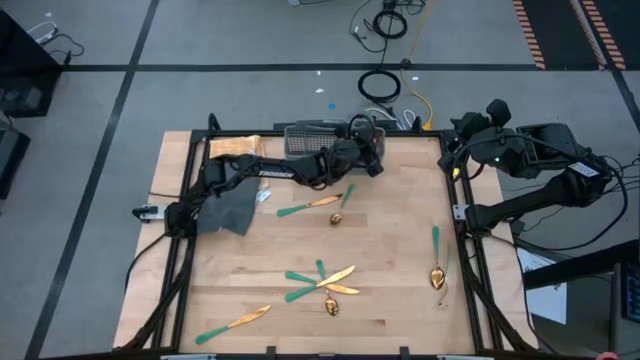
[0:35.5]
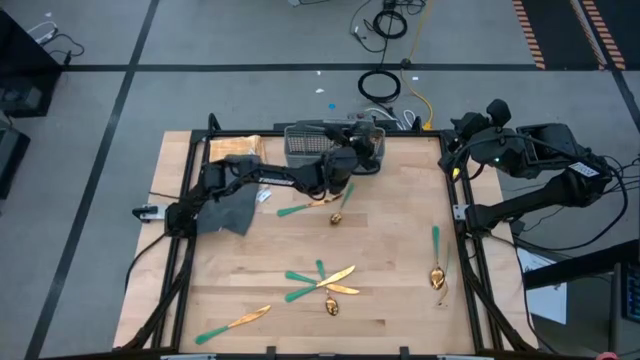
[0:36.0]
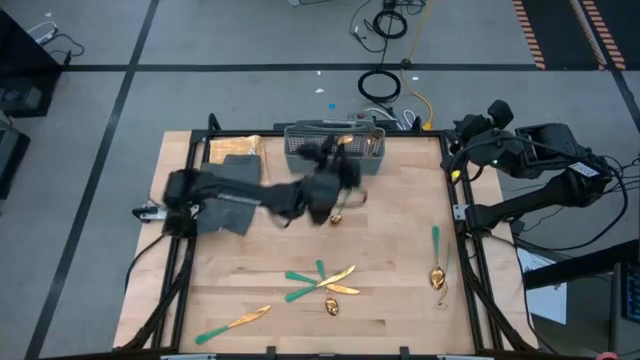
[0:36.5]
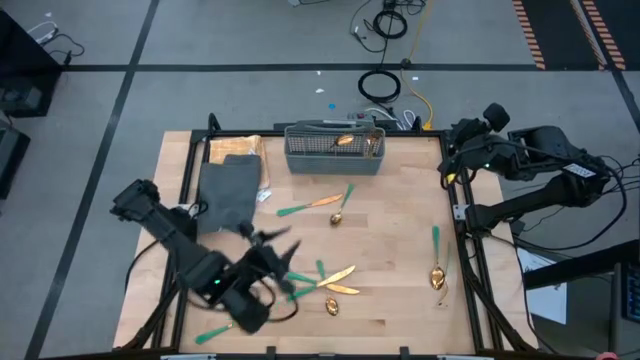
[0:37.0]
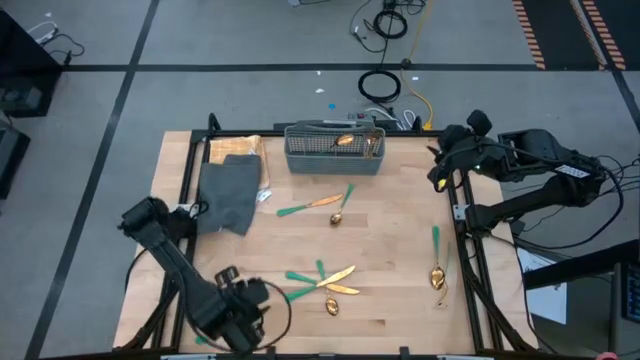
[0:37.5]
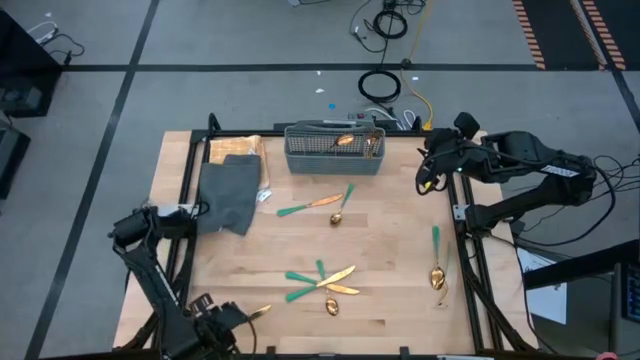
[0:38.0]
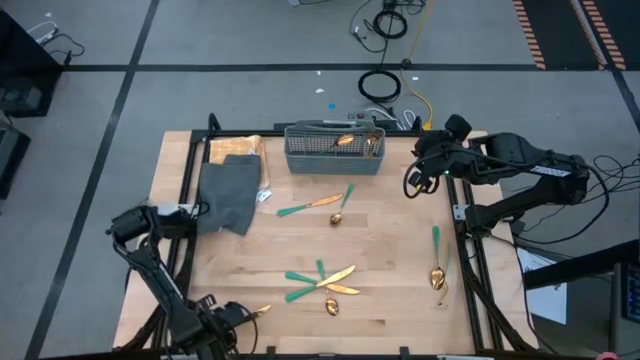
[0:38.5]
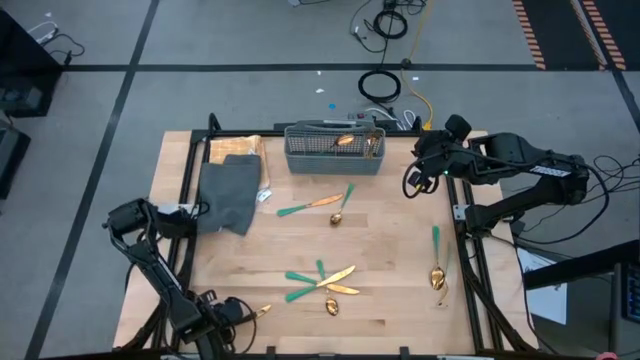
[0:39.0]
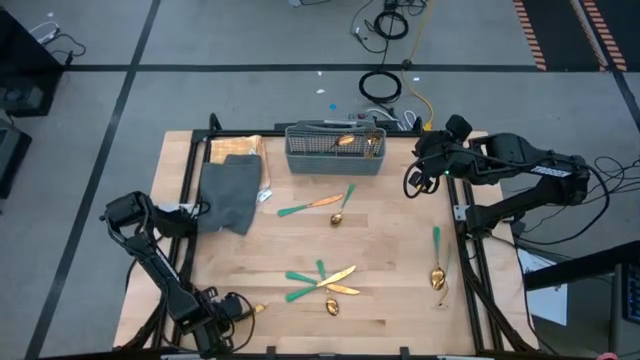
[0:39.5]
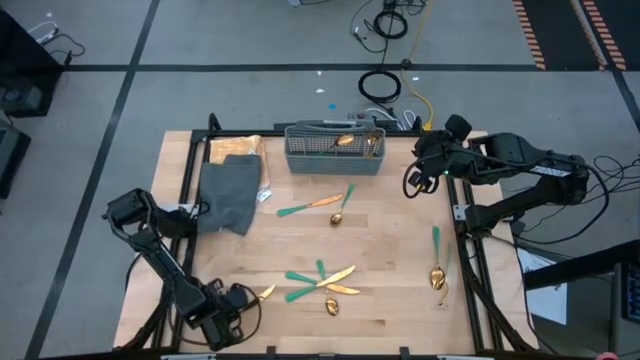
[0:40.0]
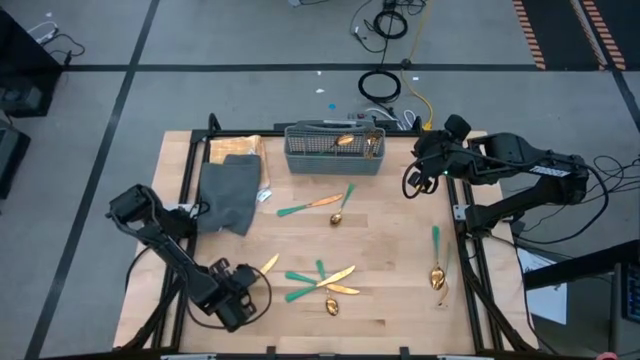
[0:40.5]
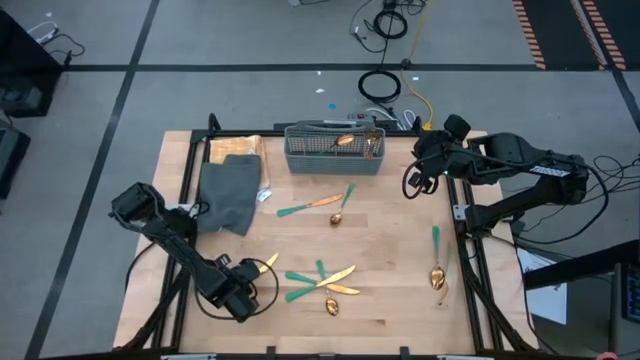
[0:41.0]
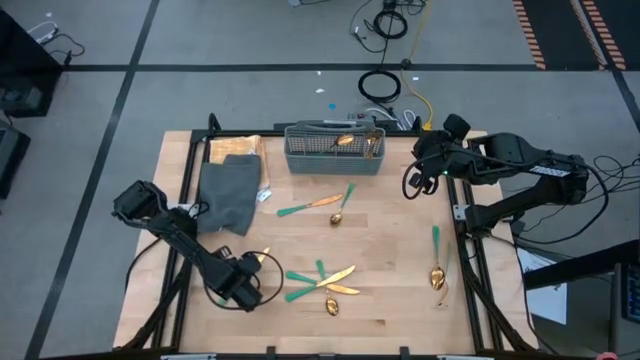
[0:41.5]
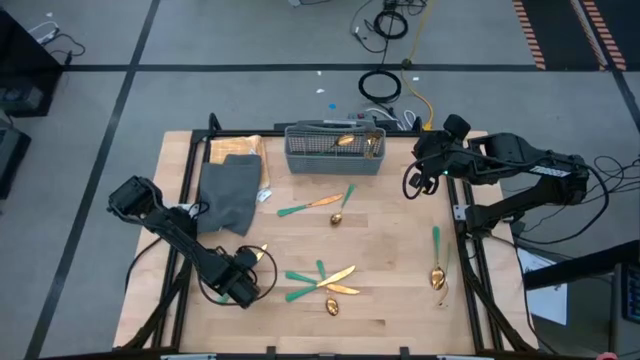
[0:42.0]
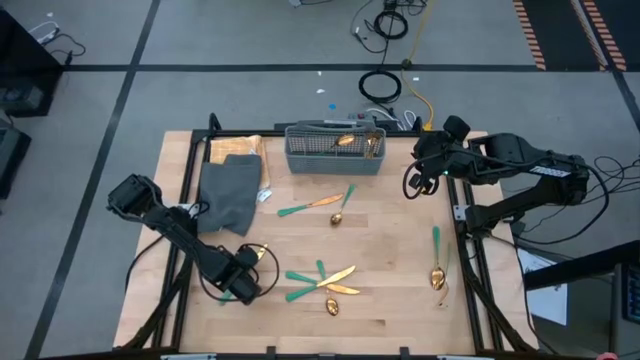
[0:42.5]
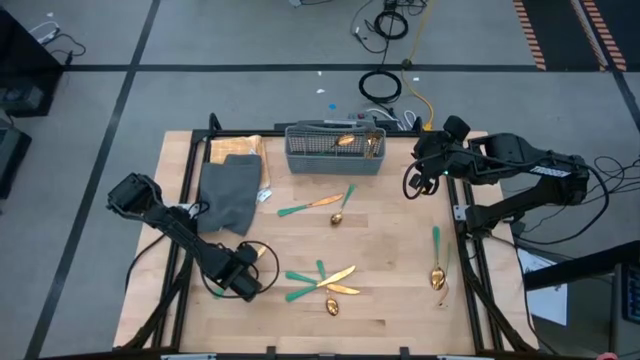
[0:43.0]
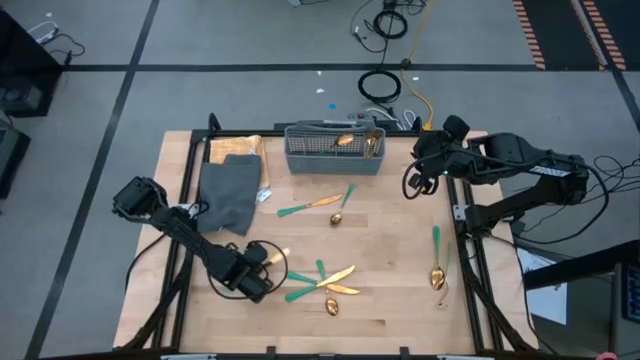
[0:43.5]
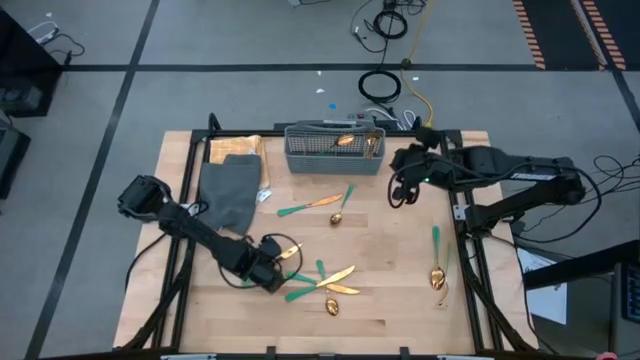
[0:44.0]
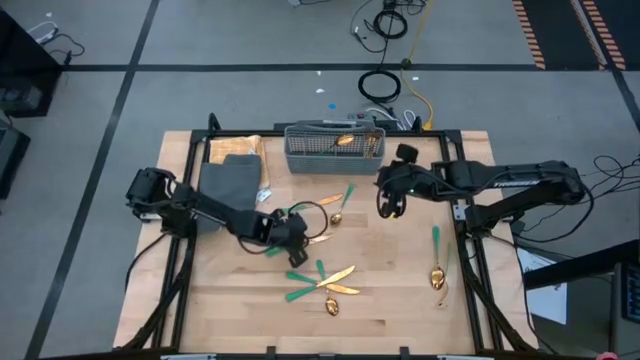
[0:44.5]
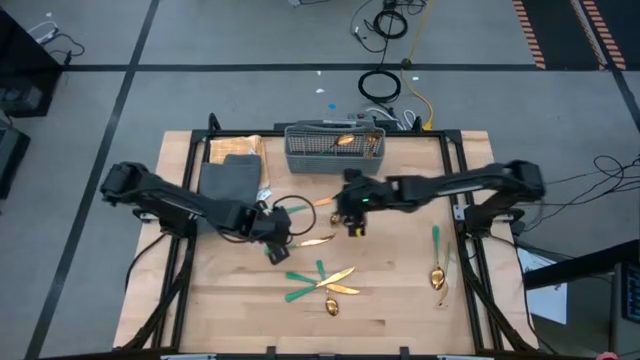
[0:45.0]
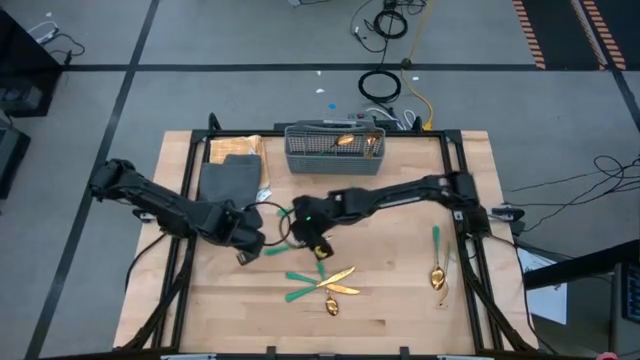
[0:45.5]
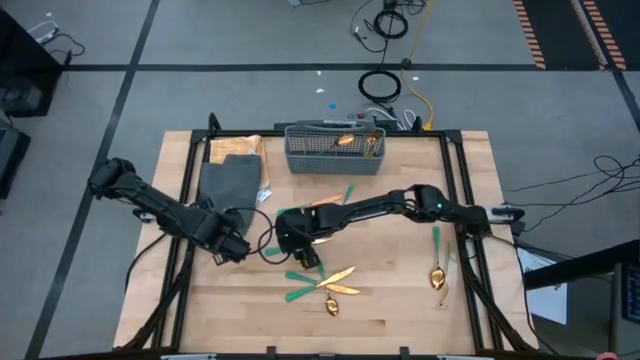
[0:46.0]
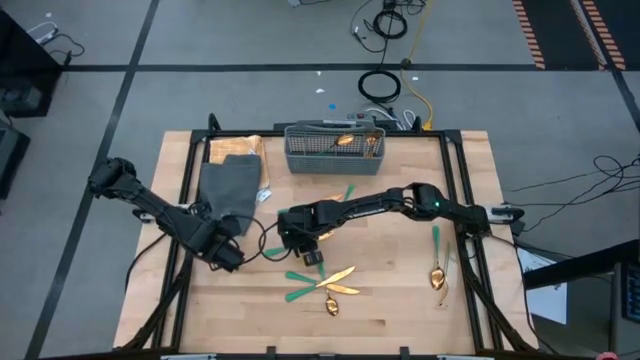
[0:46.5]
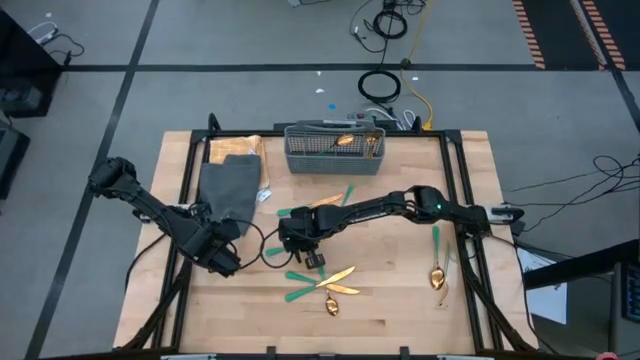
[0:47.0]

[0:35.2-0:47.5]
Task: Sort silverware
Put the green knife into the gray silverware basket

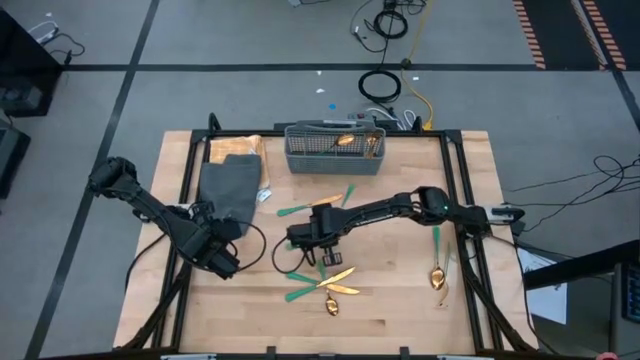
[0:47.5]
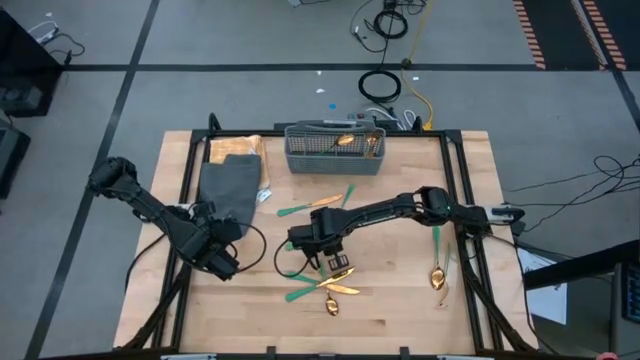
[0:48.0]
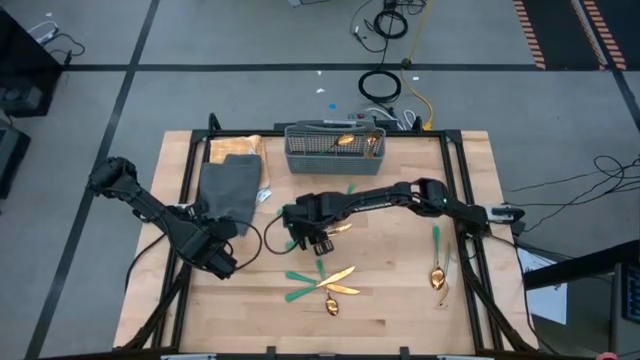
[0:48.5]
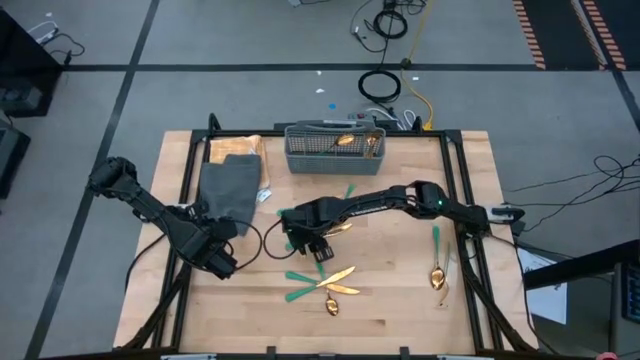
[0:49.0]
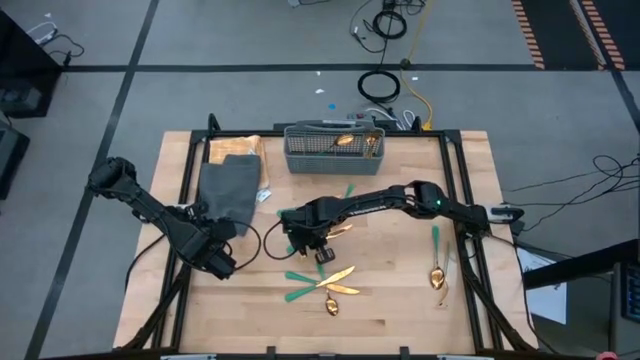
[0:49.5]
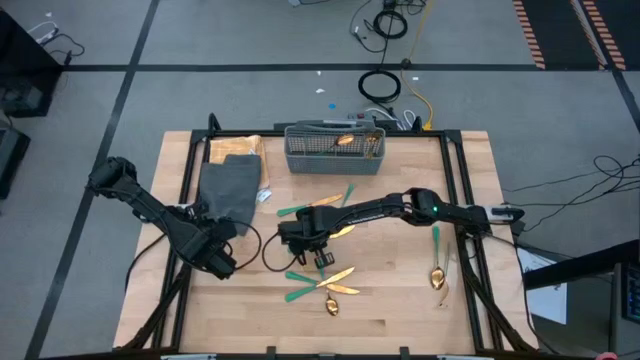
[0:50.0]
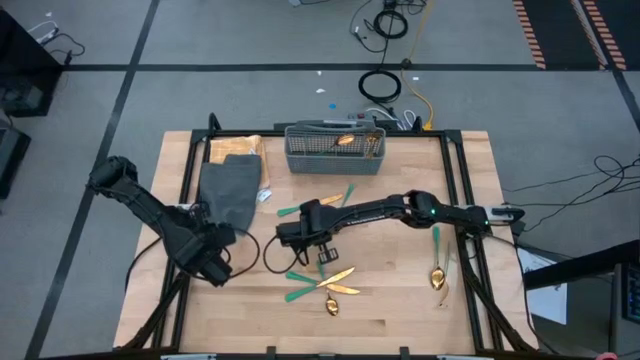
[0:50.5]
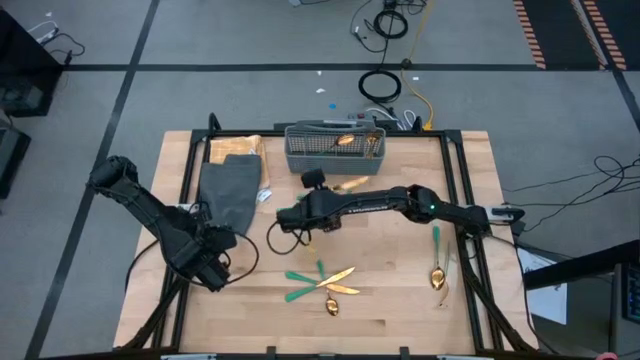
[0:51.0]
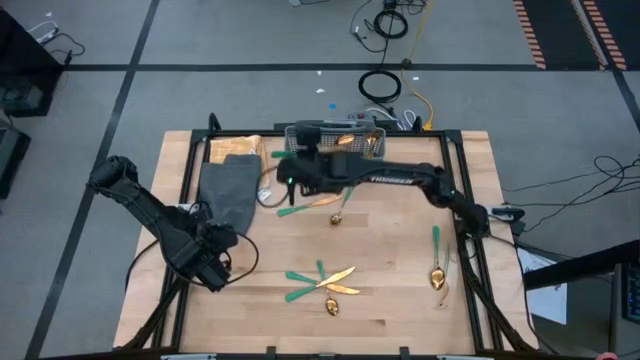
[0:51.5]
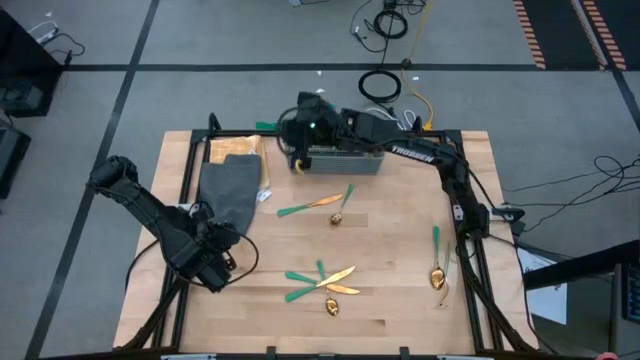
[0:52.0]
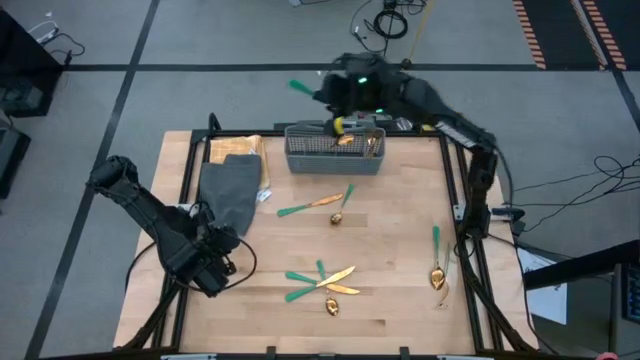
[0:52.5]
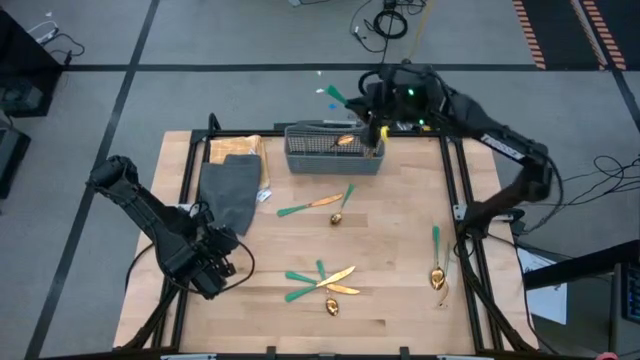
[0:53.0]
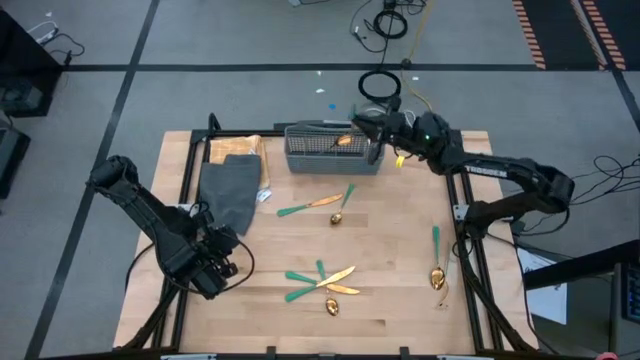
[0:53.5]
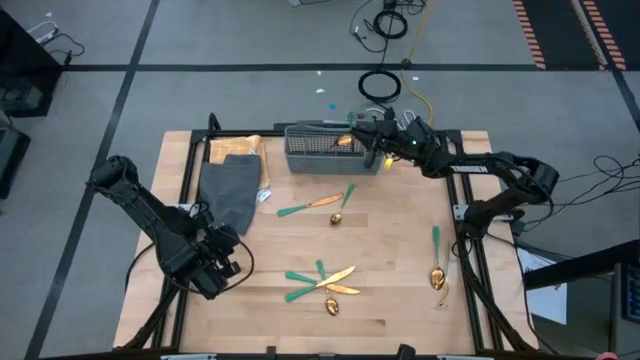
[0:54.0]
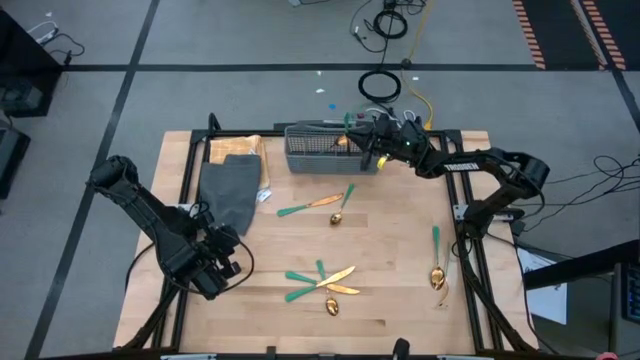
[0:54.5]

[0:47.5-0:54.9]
Put the green knife into the gray silverware basket

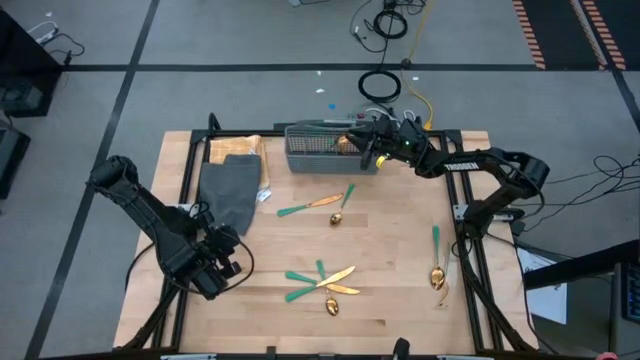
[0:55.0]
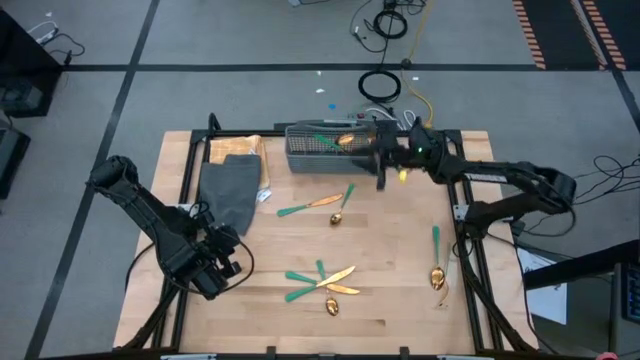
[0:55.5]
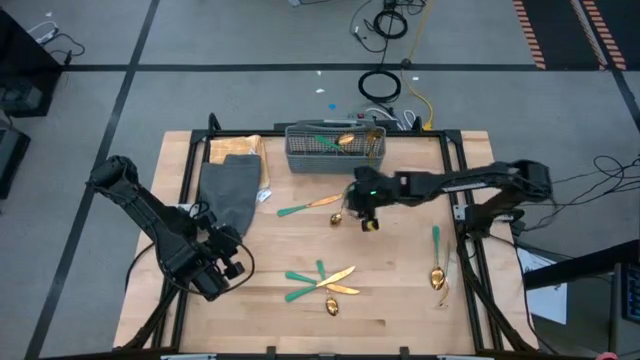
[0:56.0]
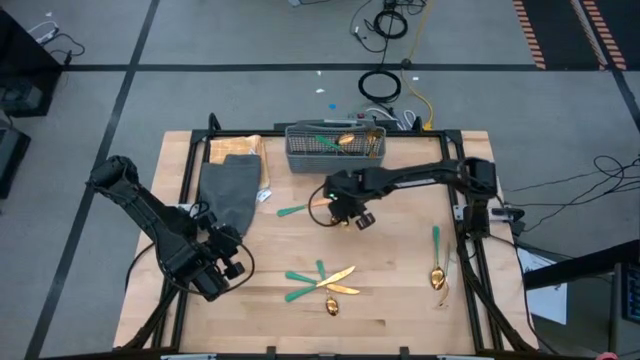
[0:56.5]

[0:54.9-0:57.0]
Put the green spoon into the gray silverware basket
